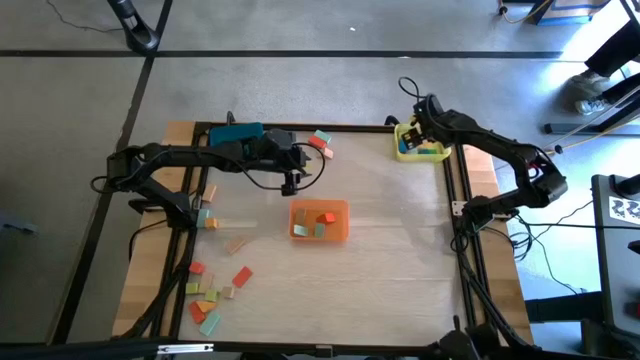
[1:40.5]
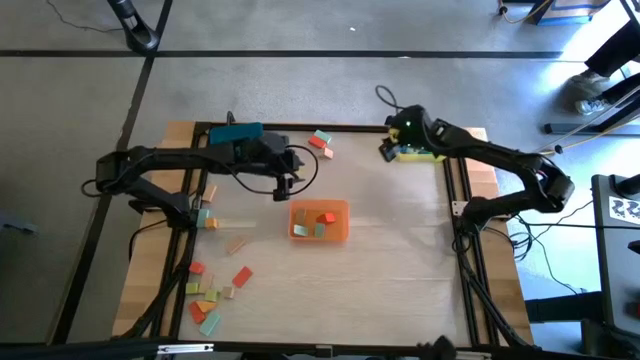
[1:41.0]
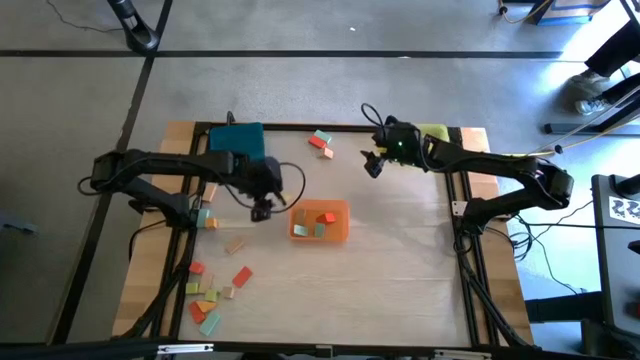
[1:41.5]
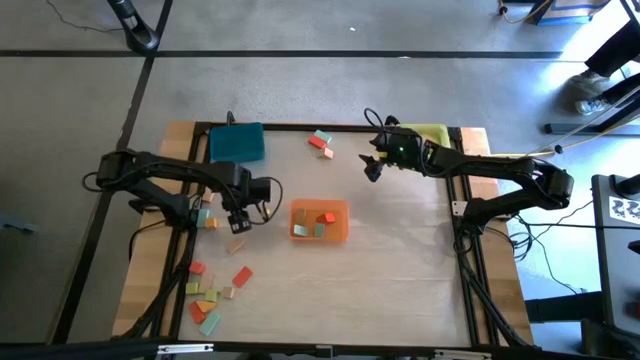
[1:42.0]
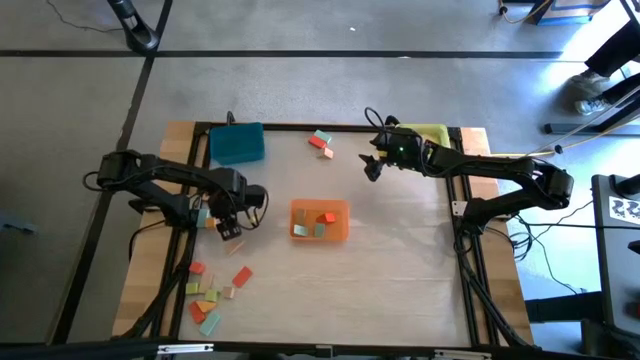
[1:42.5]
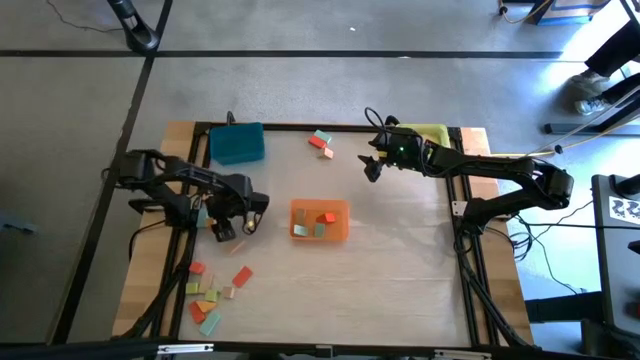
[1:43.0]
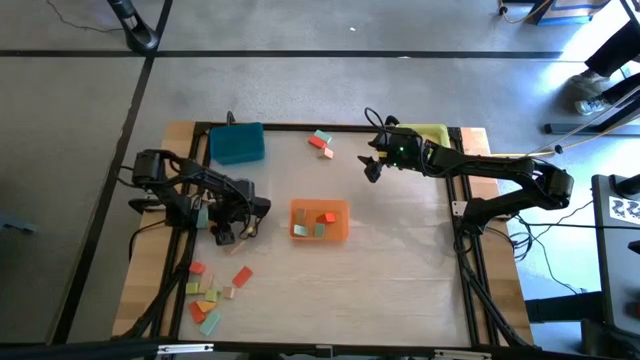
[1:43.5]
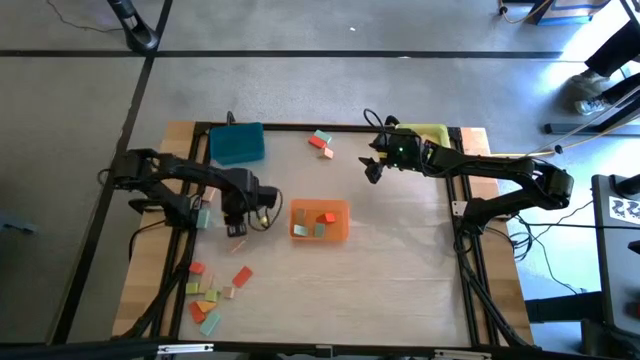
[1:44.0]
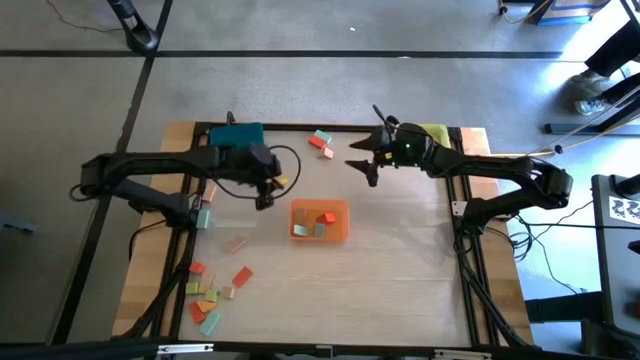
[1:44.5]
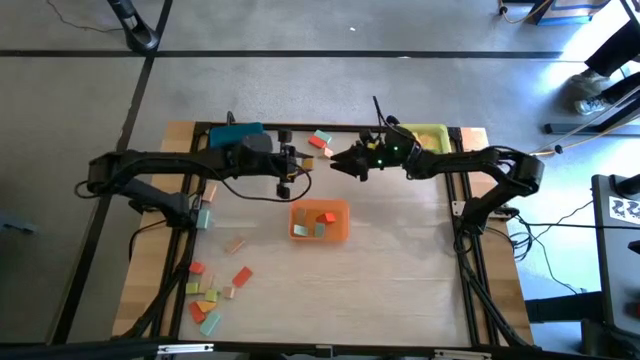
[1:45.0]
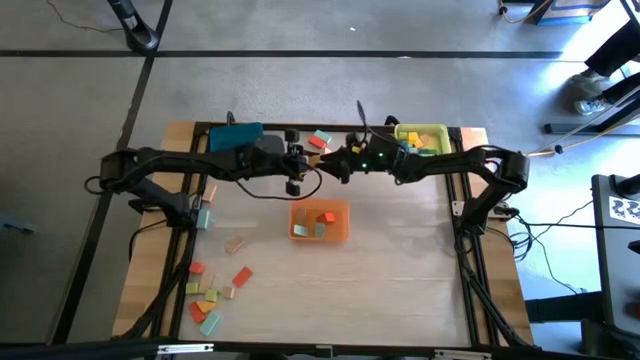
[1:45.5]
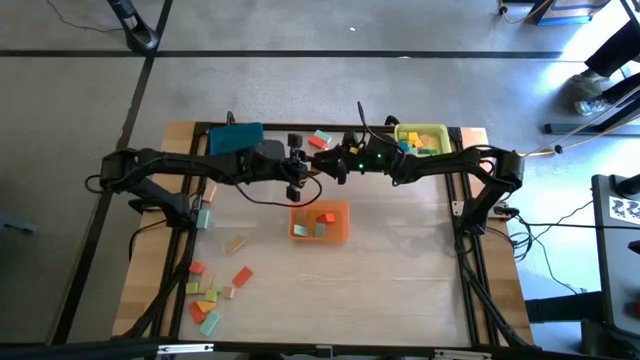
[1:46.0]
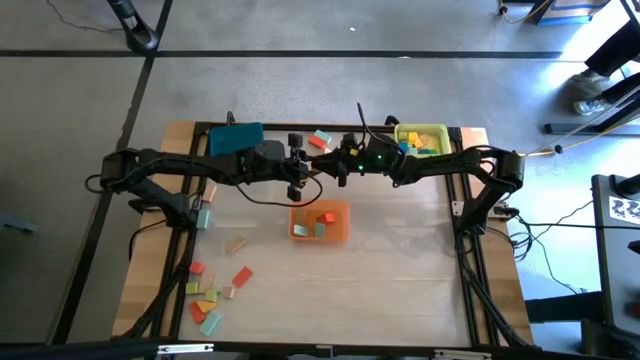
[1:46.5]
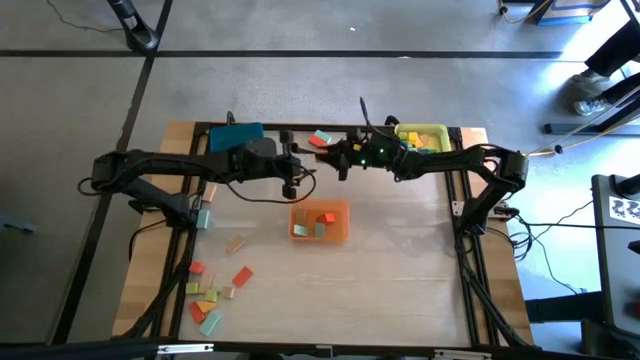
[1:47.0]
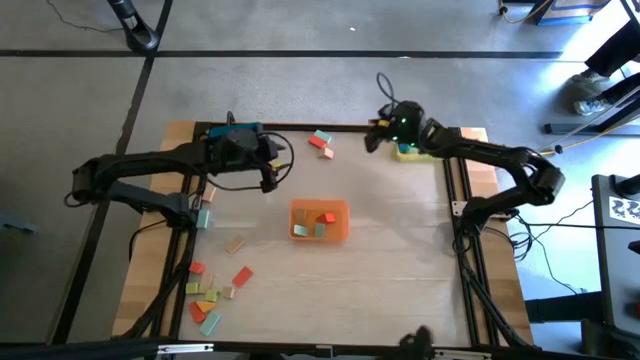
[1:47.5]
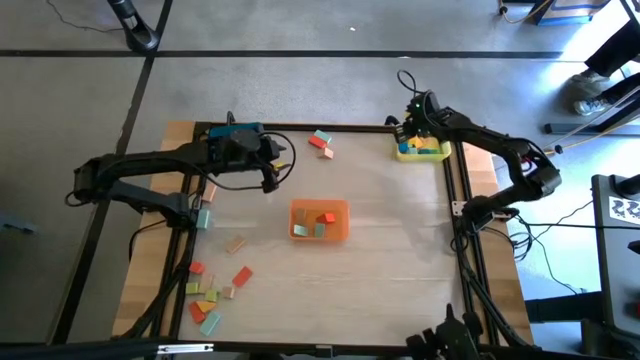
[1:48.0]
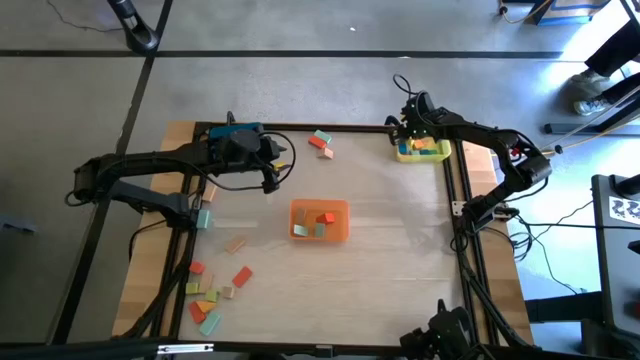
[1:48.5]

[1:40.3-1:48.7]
Task: Sort blocks by size
Put the yellow cube block into the yellow bin

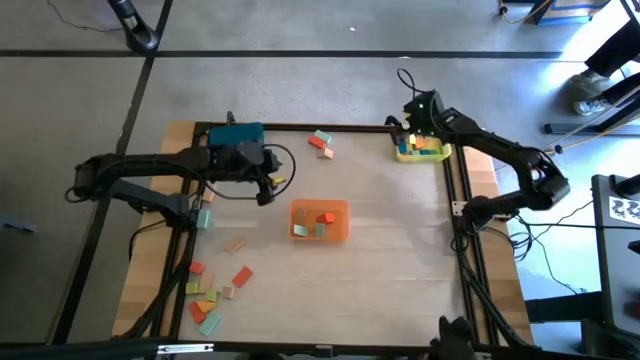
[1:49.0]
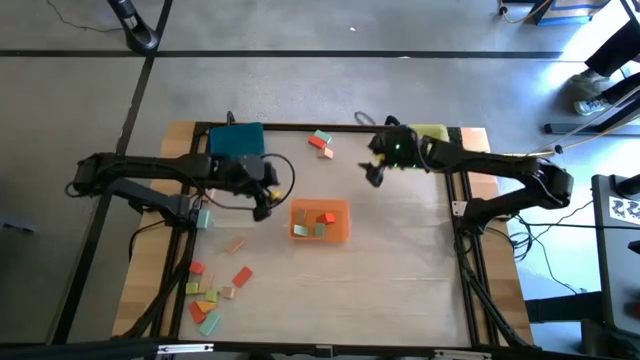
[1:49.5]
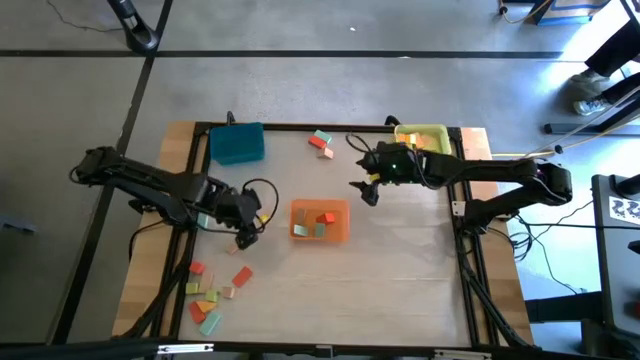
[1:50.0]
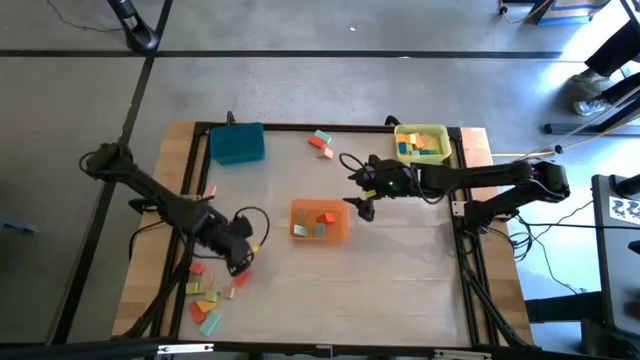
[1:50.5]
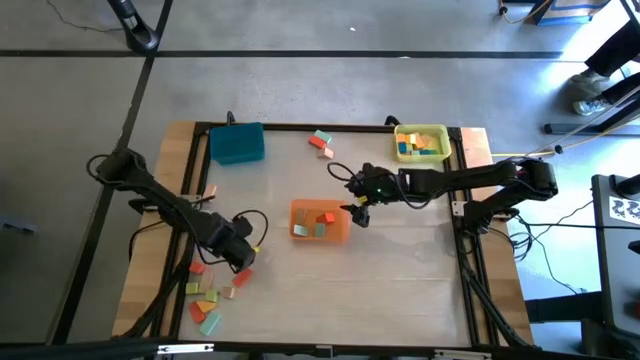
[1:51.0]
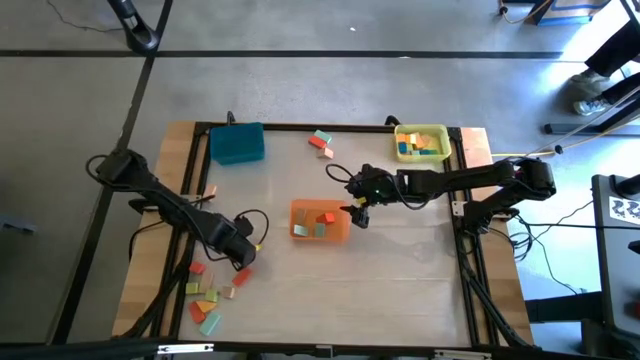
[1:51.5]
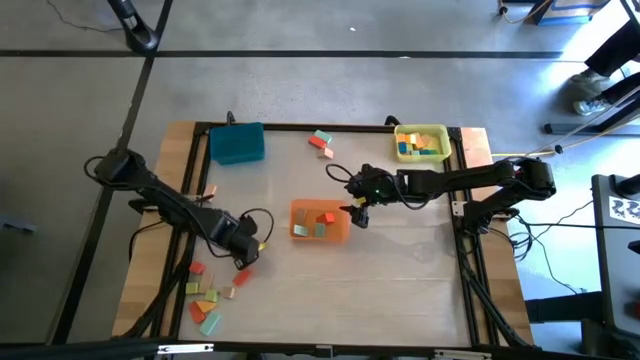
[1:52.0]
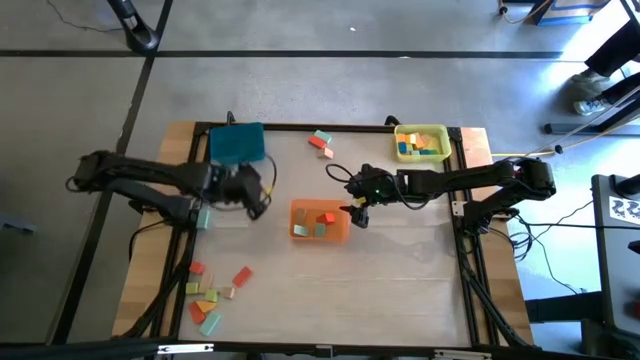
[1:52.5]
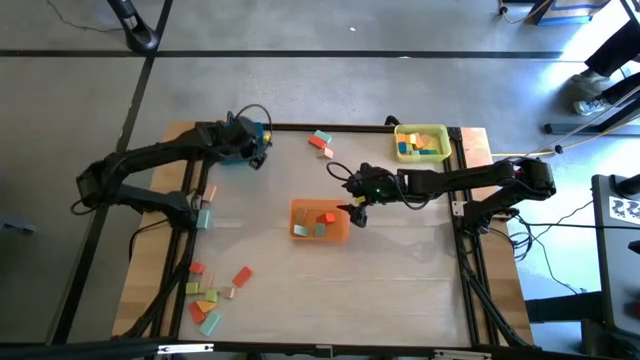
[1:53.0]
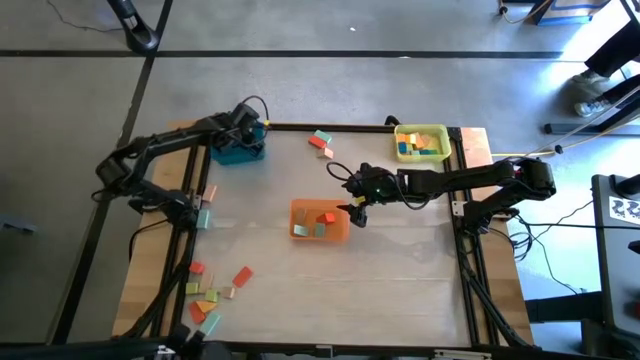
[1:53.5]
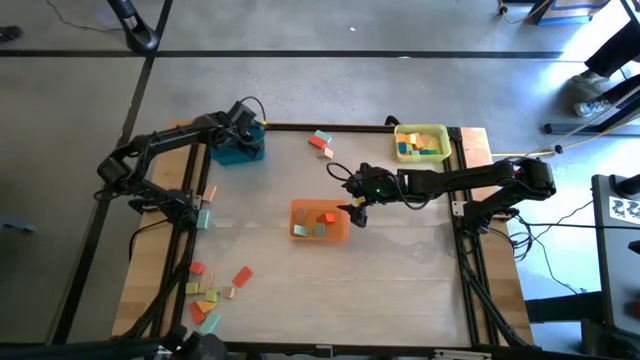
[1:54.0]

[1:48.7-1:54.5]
Put the brown rectangular block into the blue bin

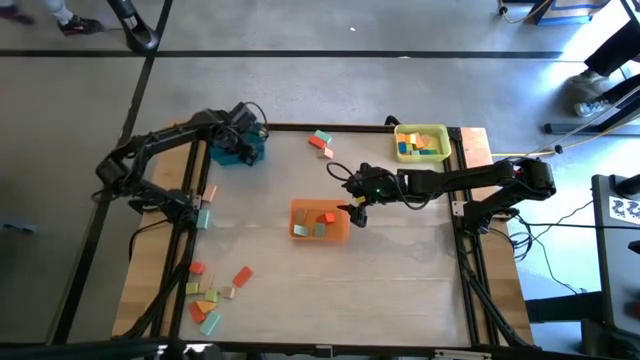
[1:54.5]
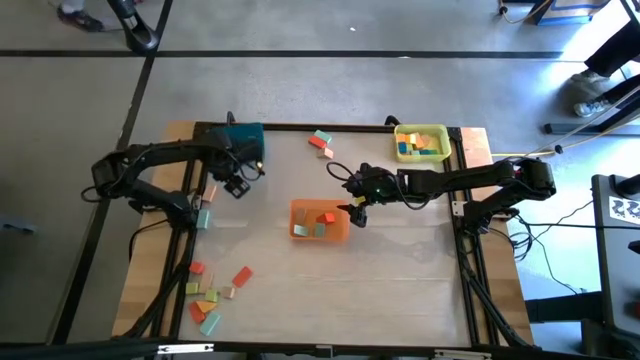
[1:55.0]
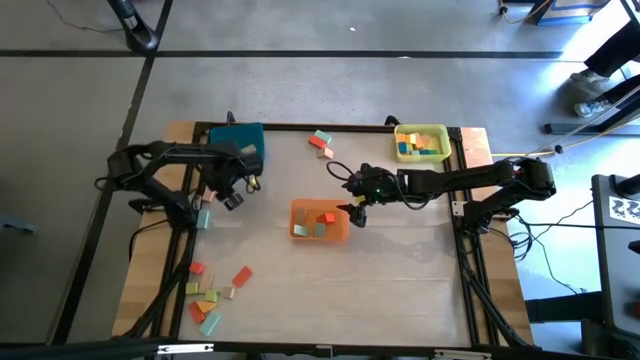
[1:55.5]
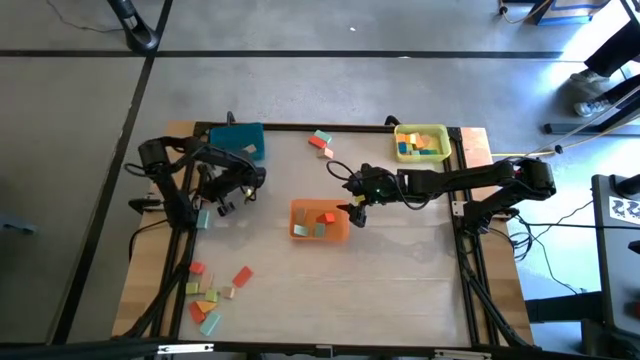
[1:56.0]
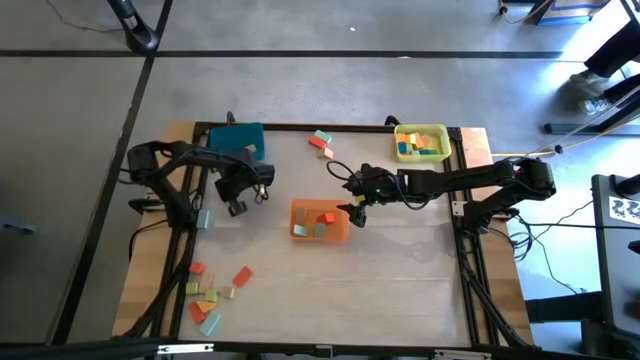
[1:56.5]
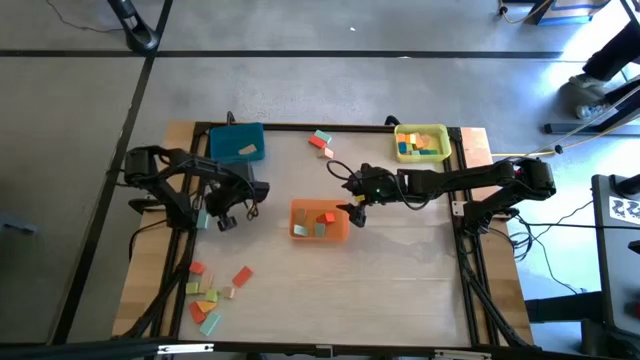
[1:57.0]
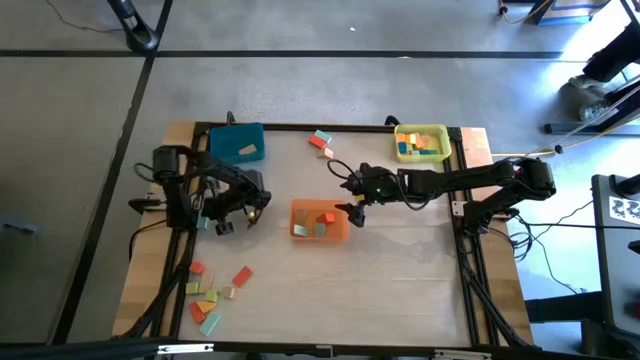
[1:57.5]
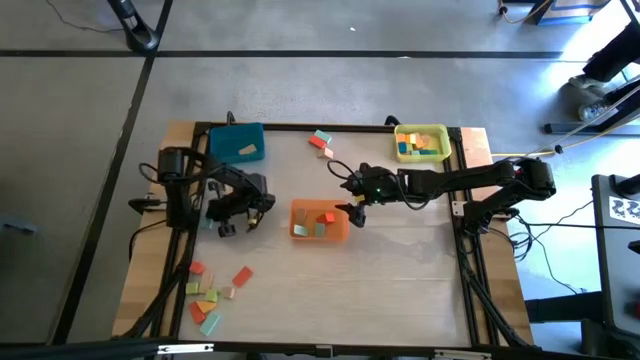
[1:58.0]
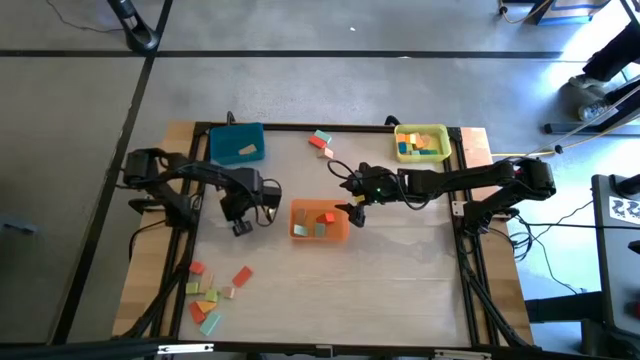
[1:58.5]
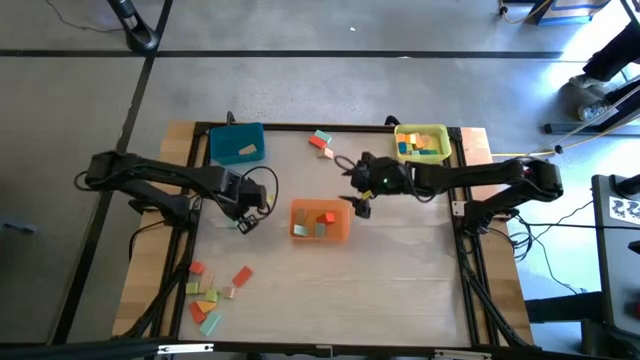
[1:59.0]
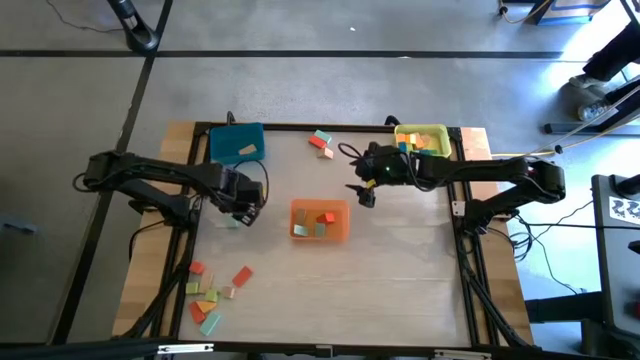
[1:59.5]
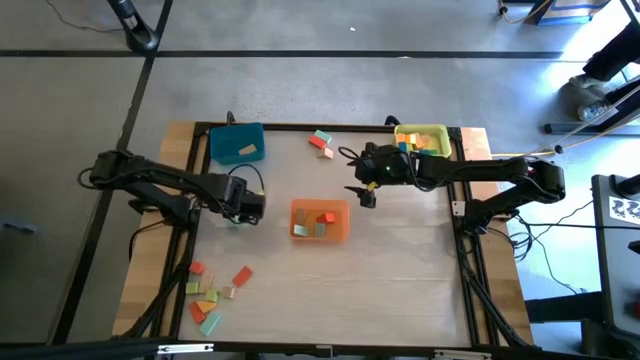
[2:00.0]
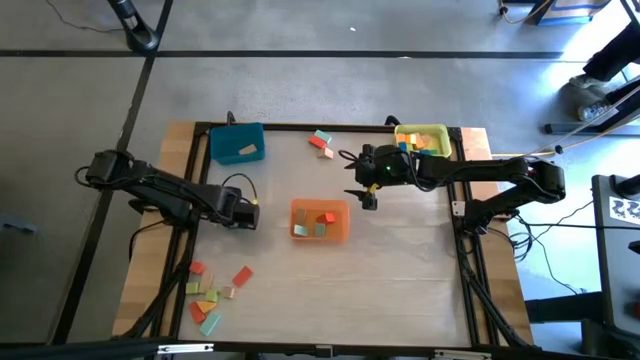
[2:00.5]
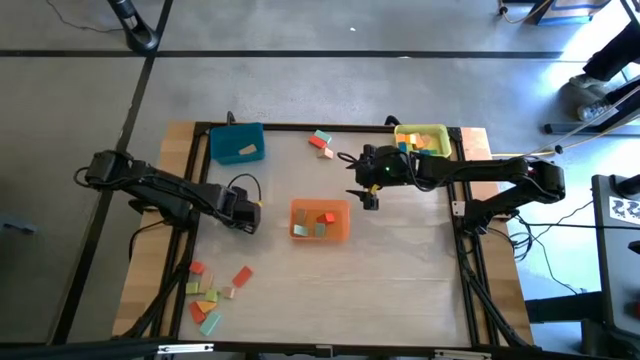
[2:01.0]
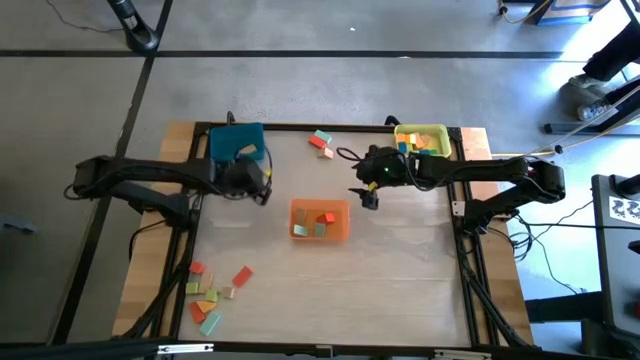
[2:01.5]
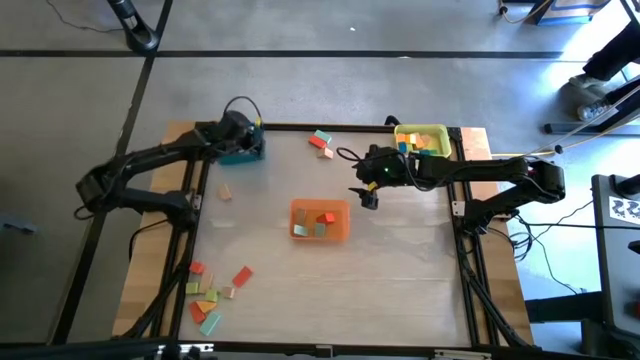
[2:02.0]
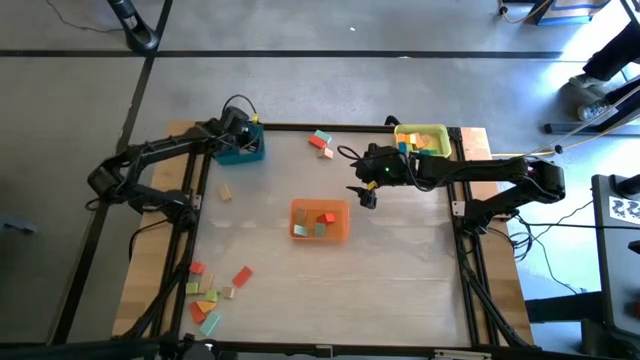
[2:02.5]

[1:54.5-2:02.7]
Put the blue rectangular block into the blue bin
